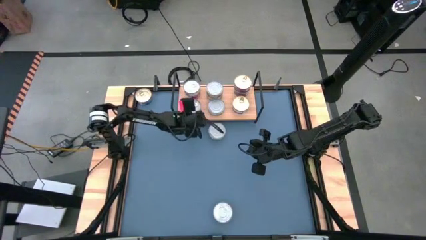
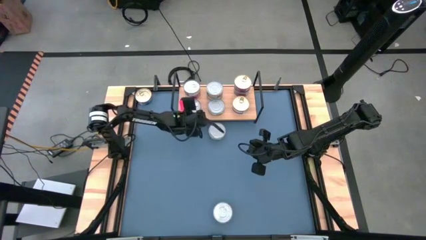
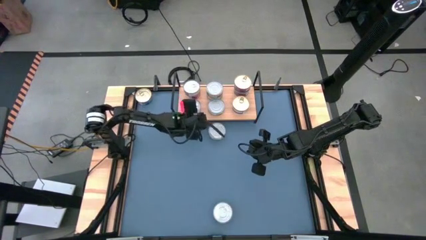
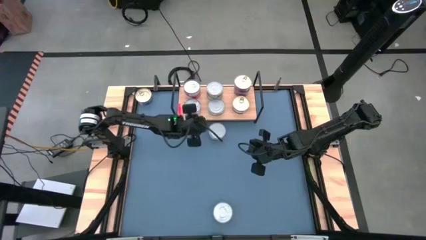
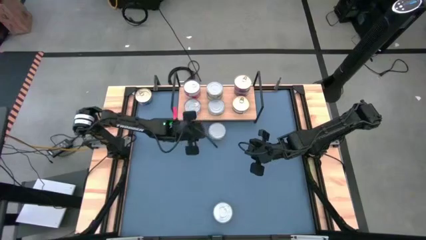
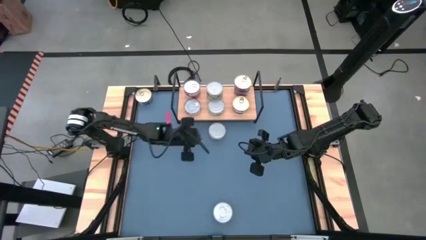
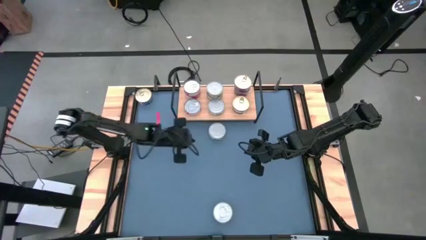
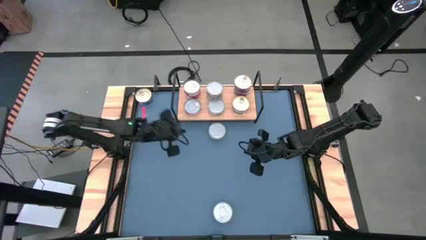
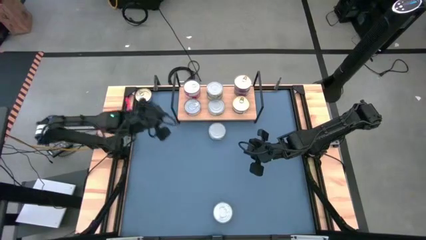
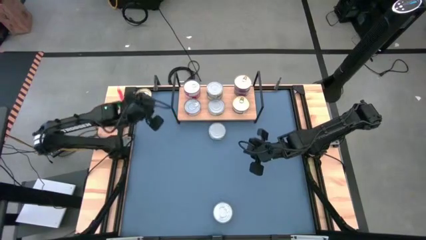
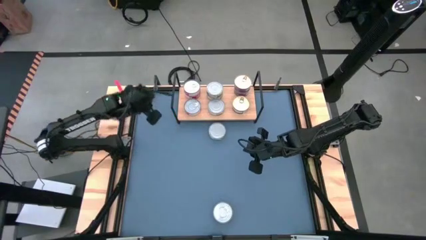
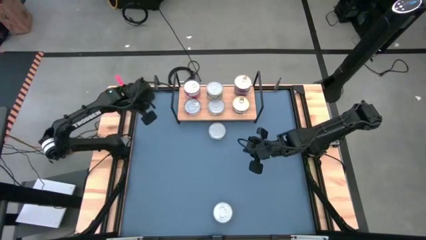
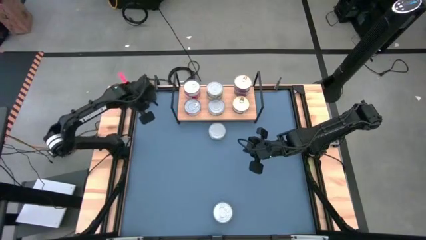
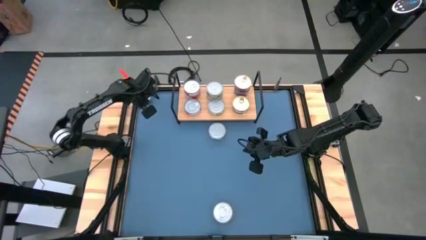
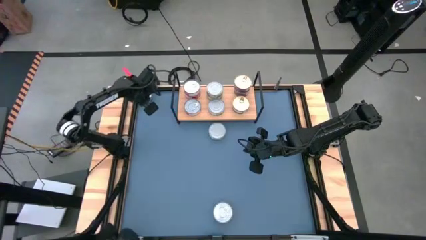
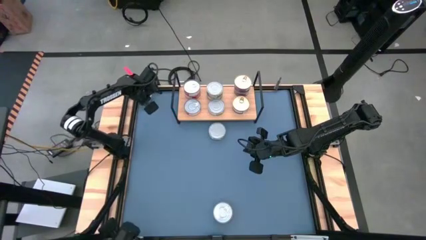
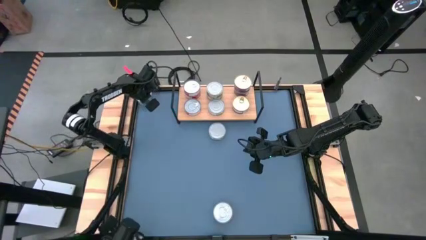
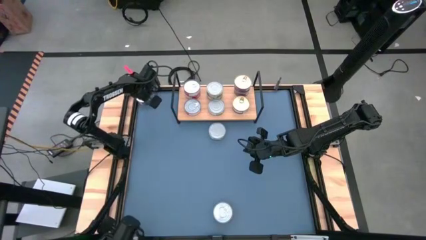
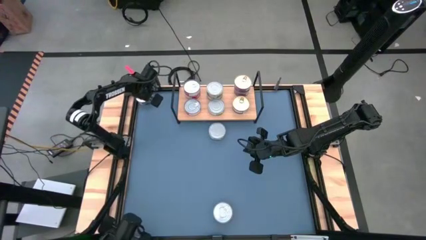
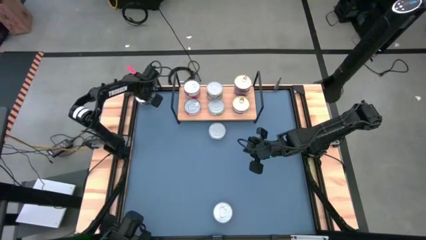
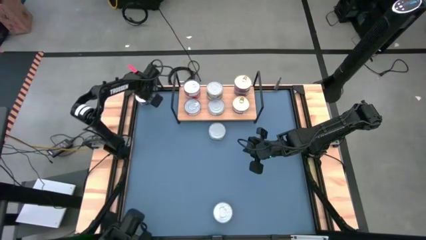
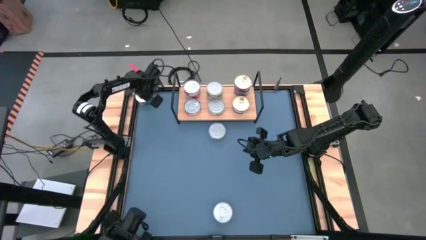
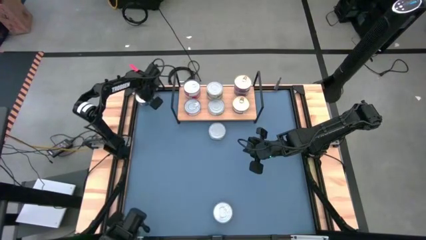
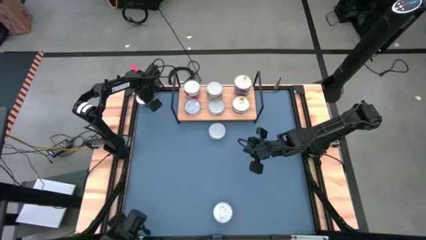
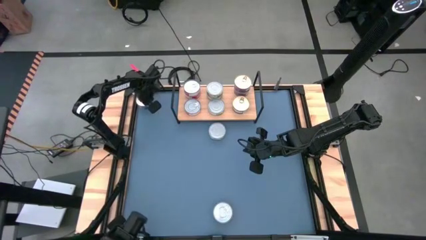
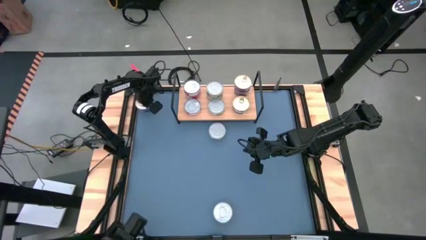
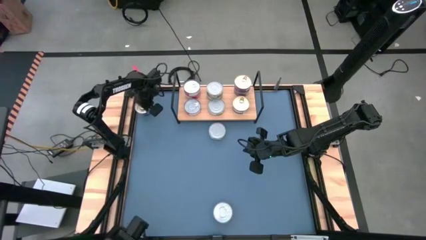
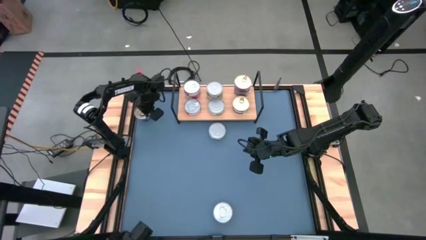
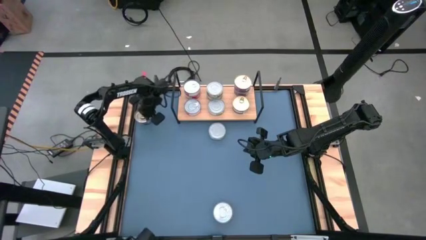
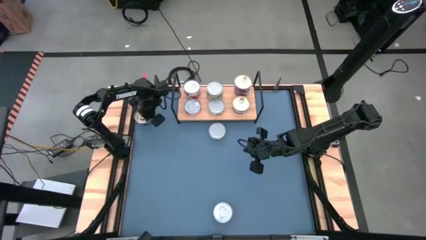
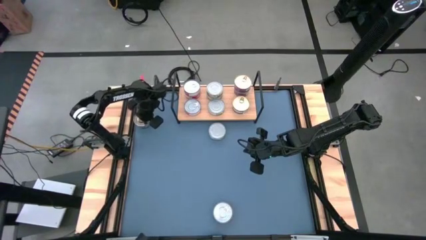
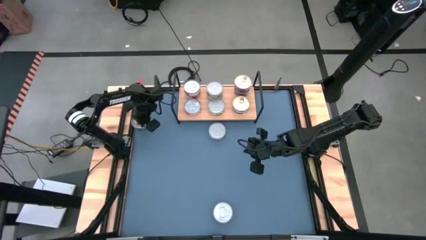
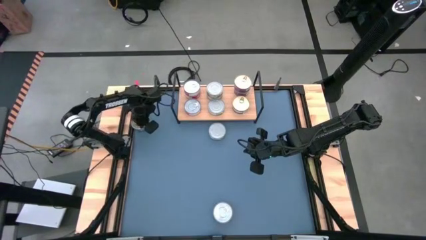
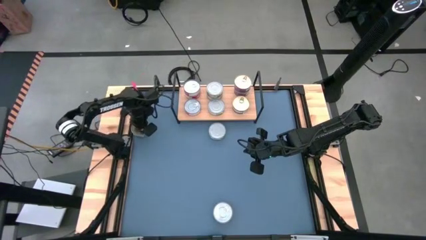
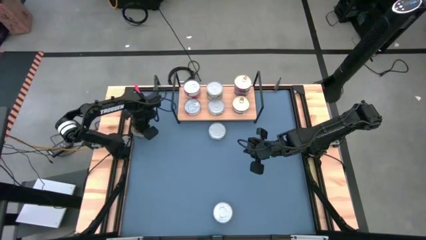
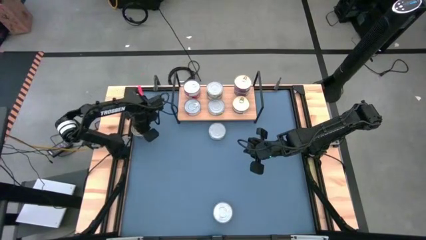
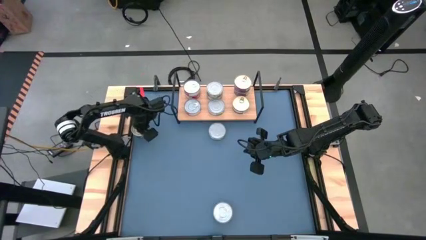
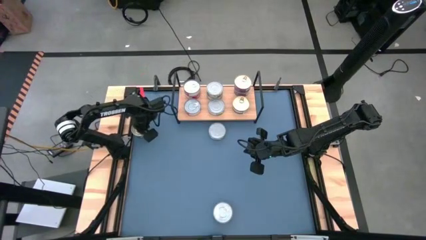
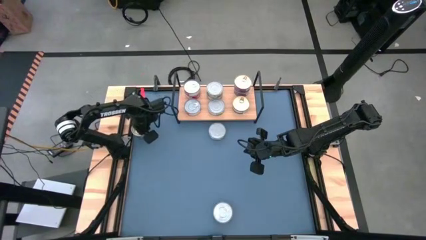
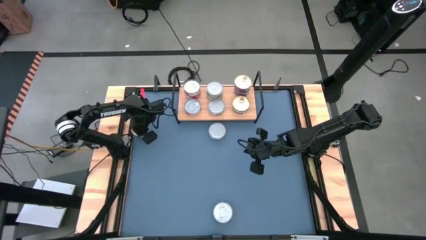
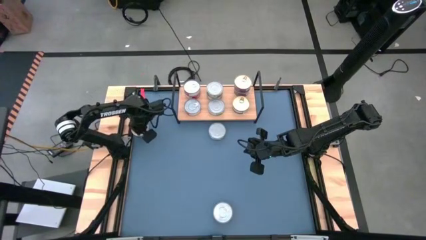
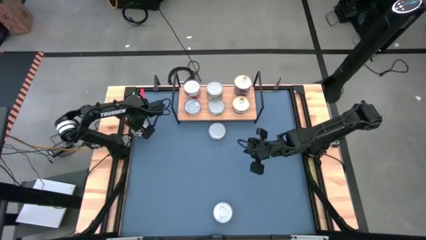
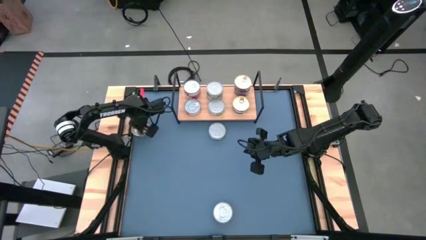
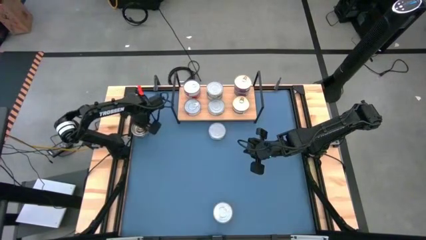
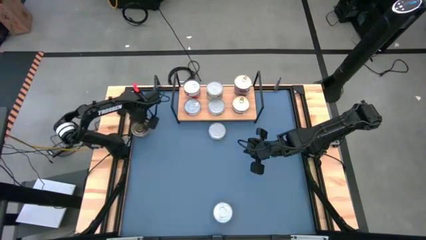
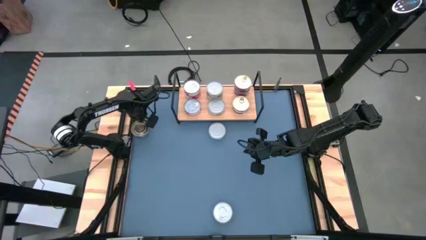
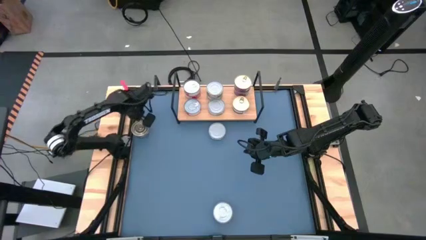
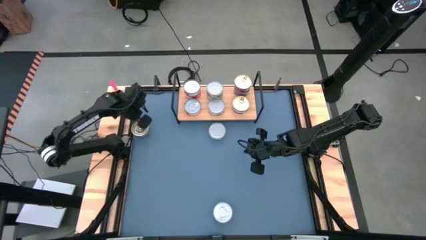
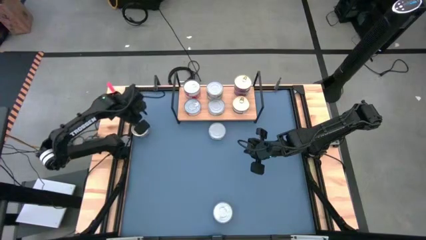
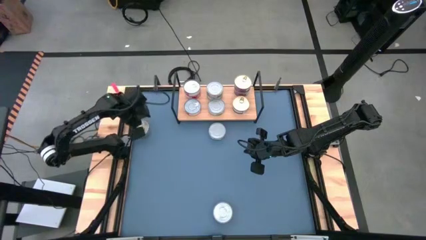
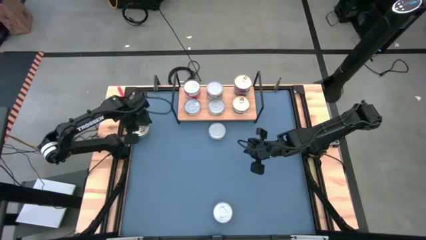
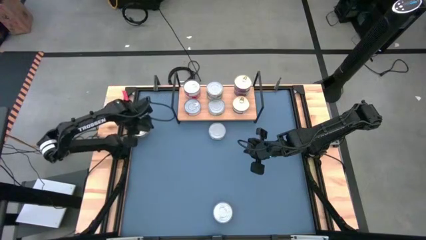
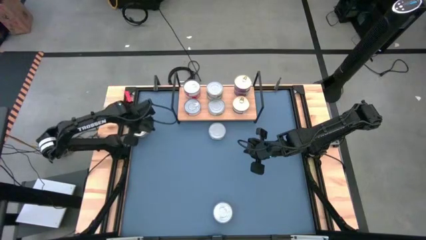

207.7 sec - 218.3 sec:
Task: Stack canned seafood by type on shelf
Stack the blue tuna can on top of the blue tuna can on the shelf

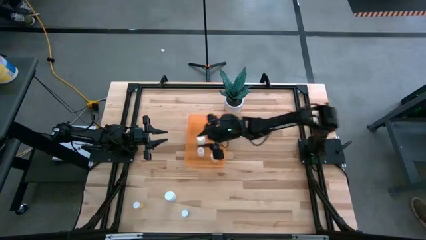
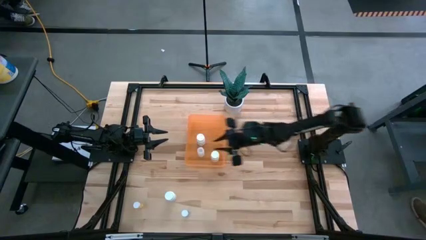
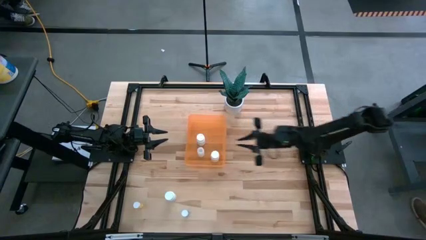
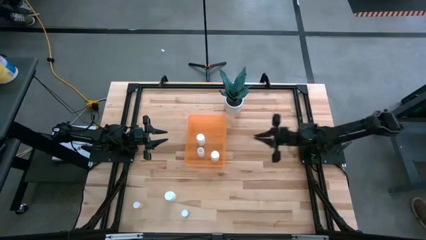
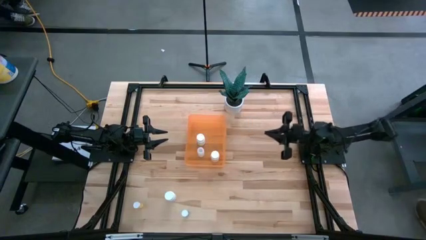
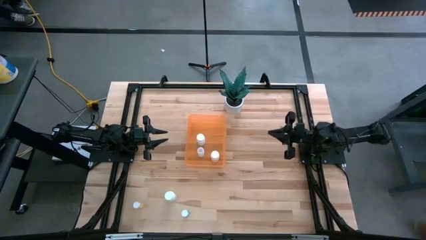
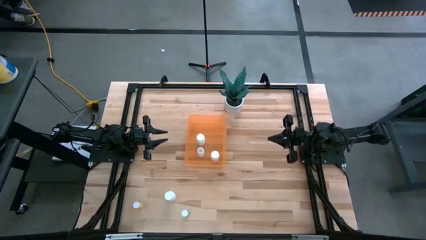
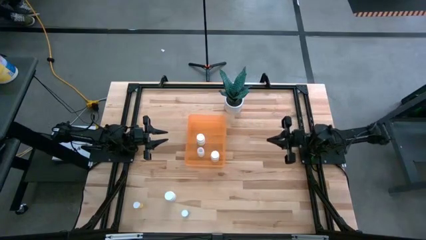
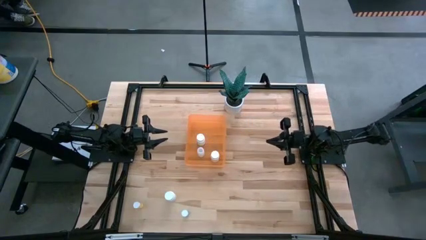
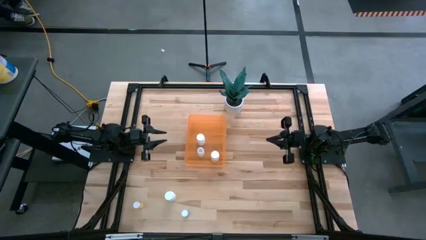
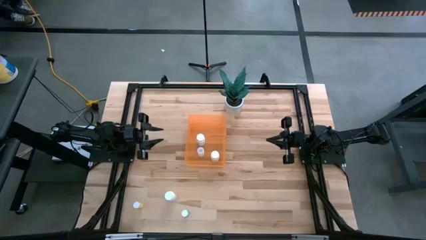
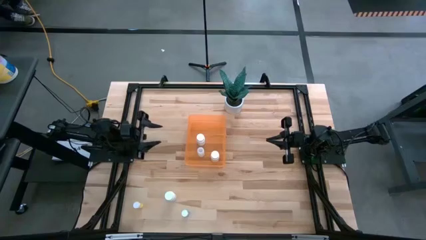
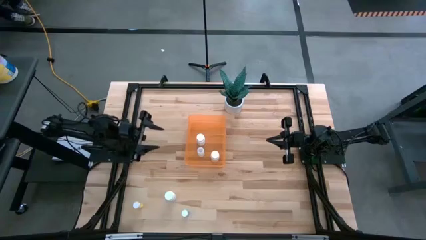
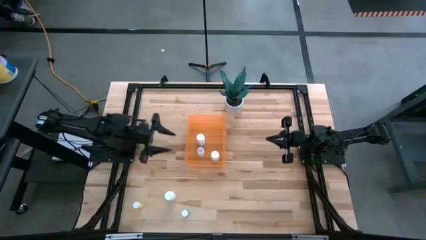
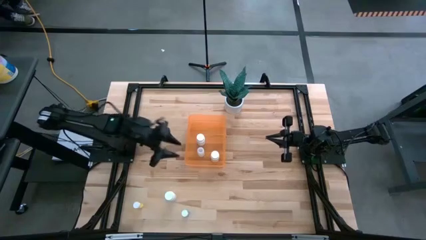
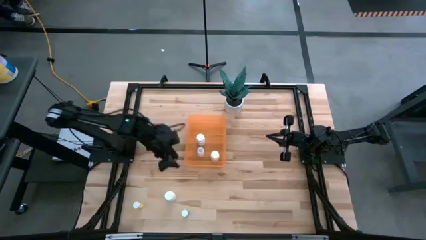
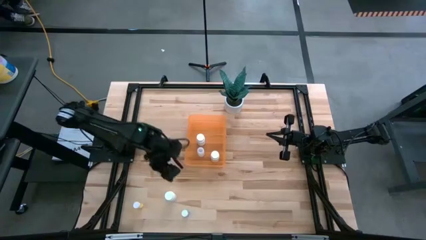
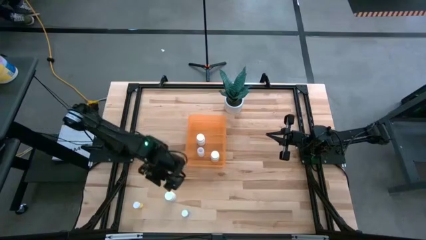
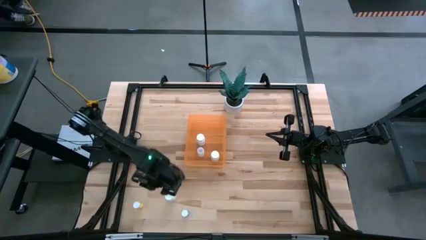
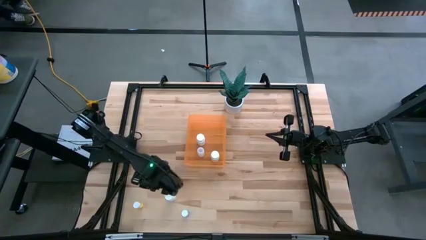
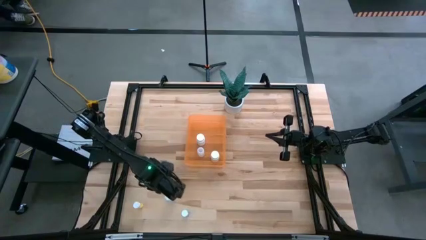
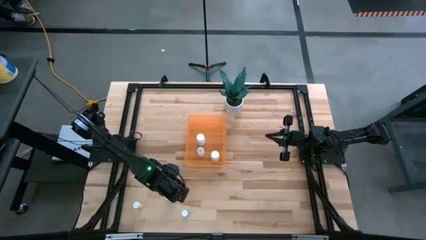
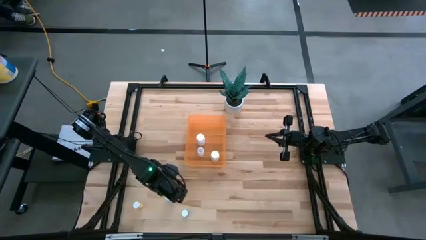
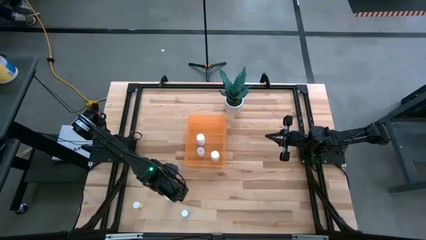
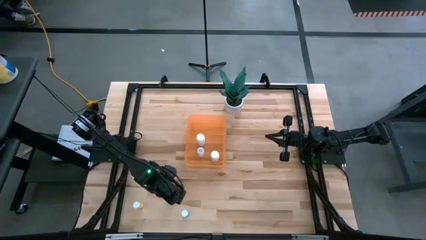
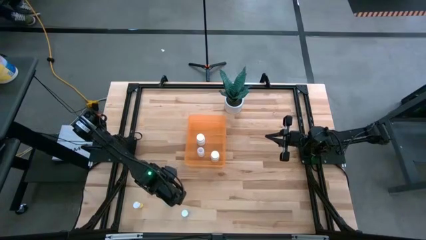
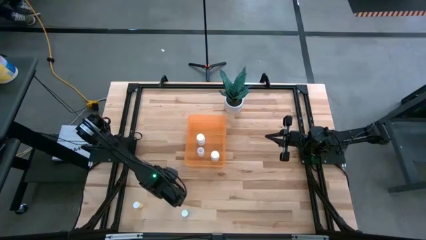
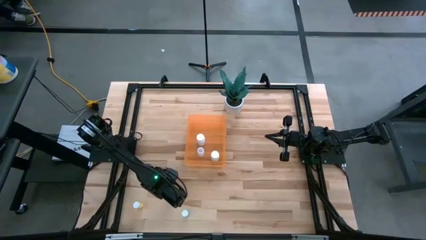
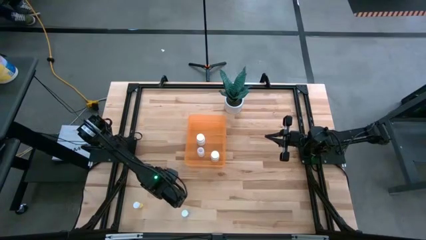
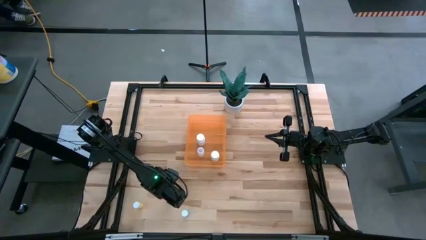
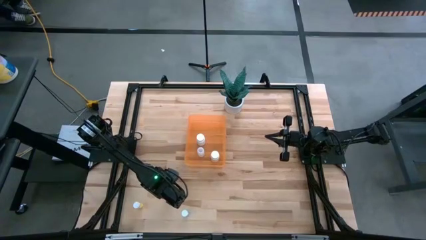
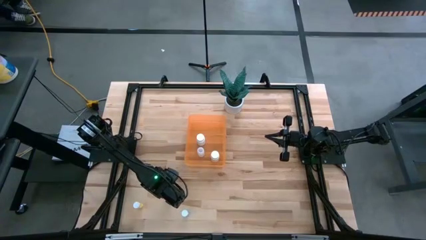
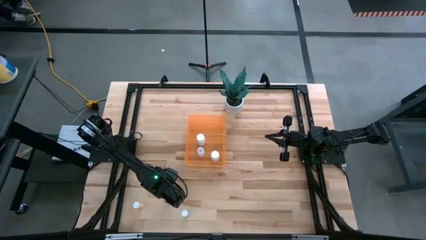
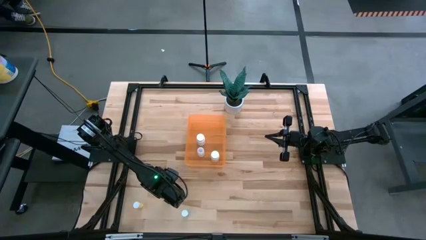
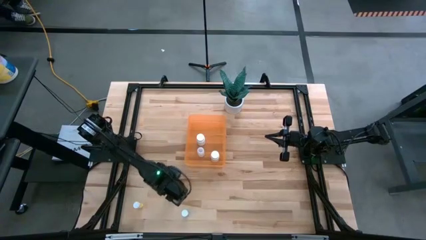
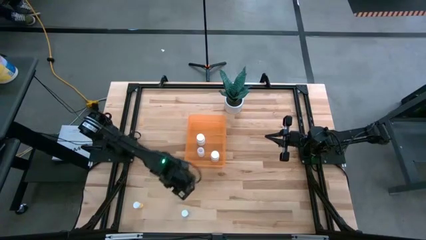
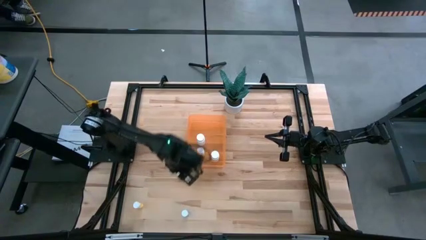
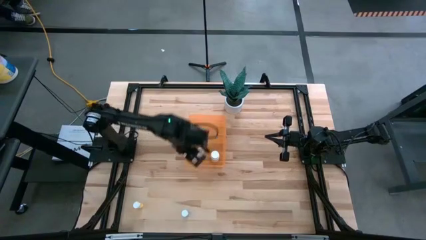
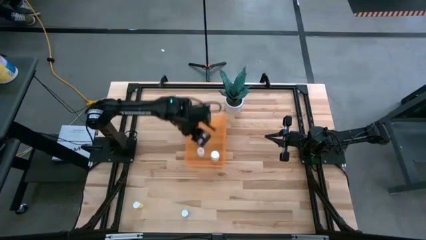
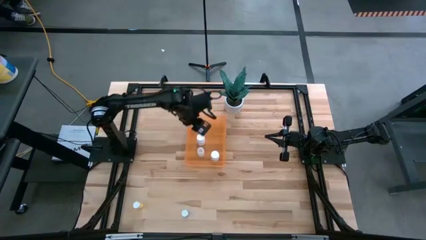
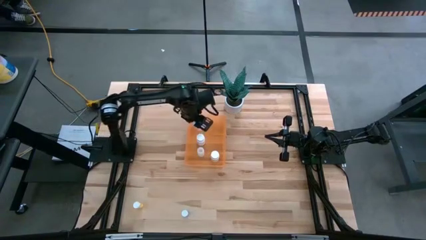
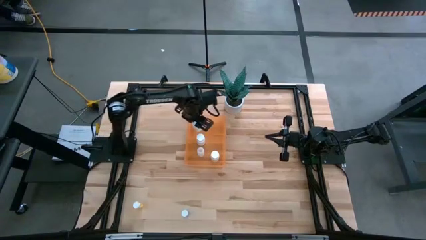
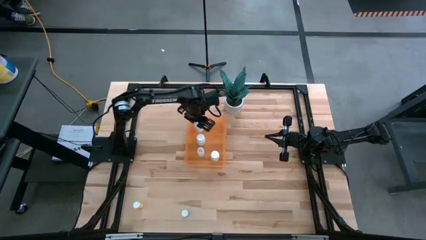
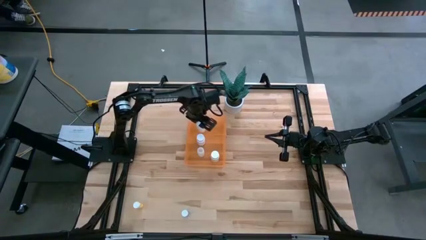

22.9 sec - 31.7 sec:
Task: Pick and place pill bottles into a basket
Put the white pill bottle into the orange container
